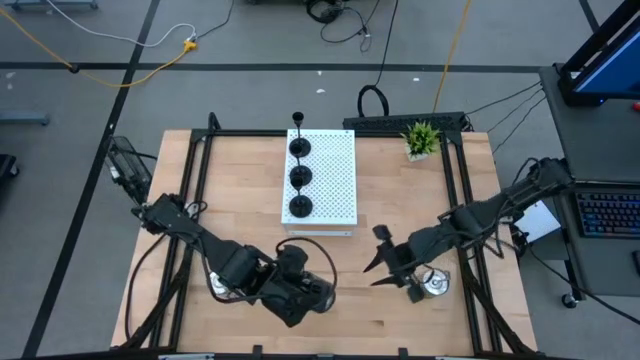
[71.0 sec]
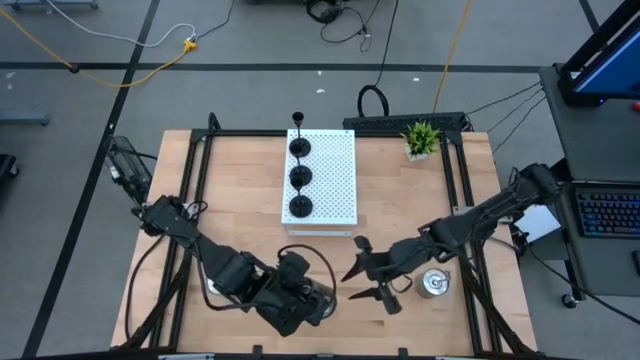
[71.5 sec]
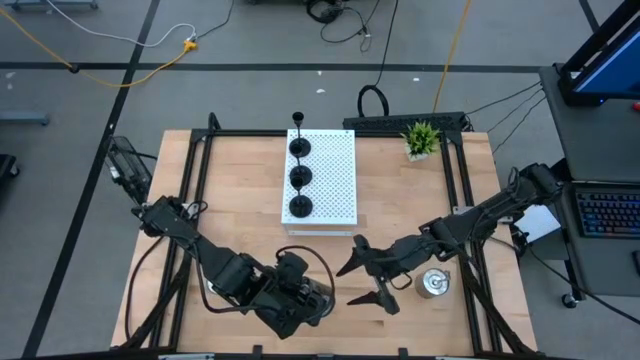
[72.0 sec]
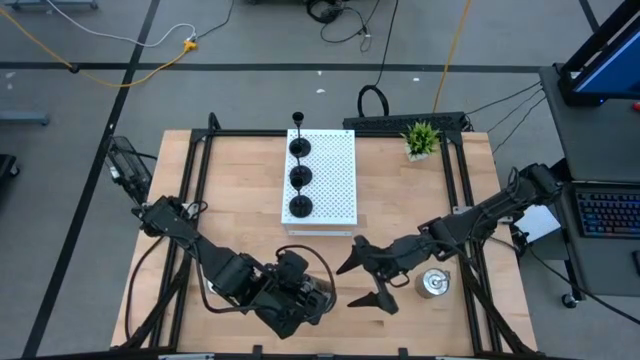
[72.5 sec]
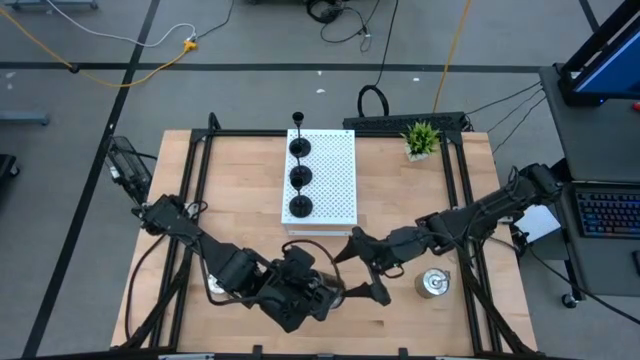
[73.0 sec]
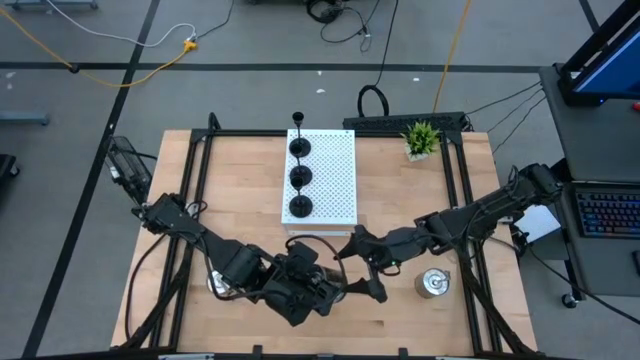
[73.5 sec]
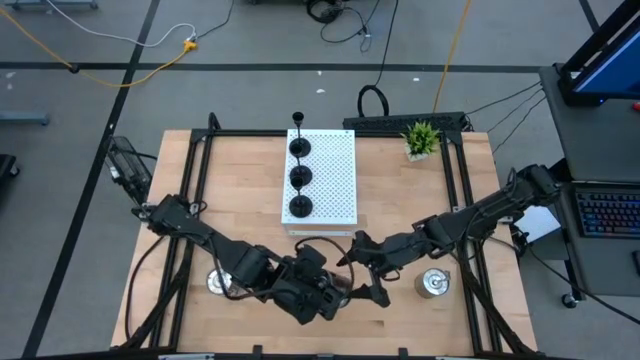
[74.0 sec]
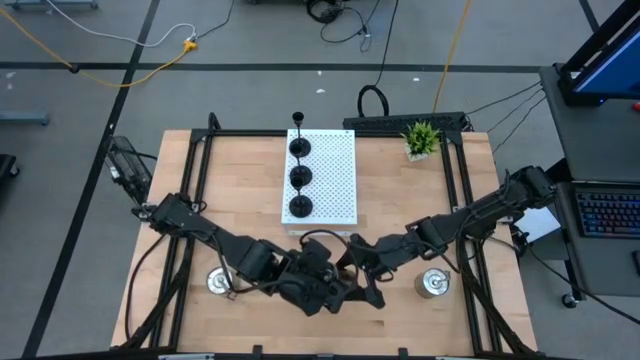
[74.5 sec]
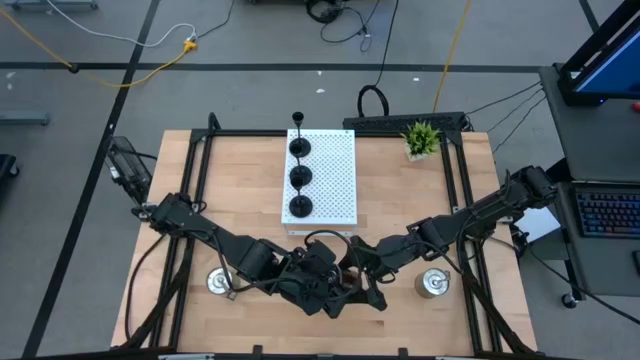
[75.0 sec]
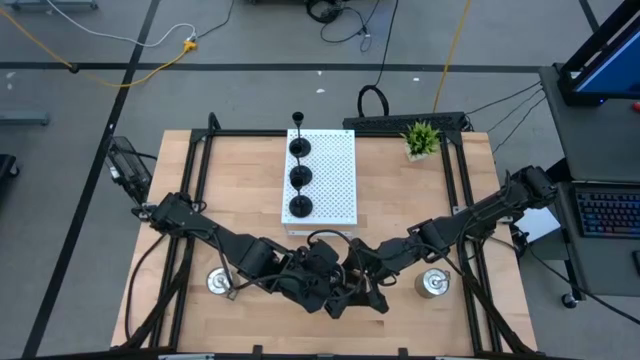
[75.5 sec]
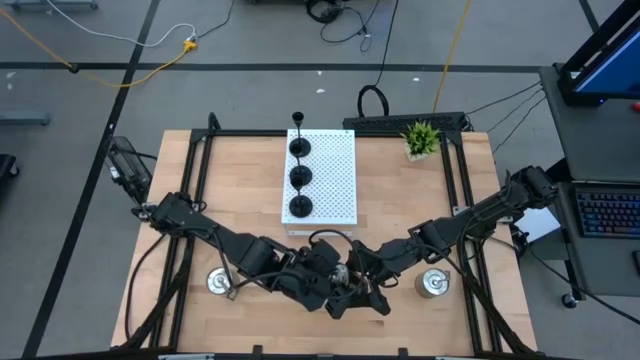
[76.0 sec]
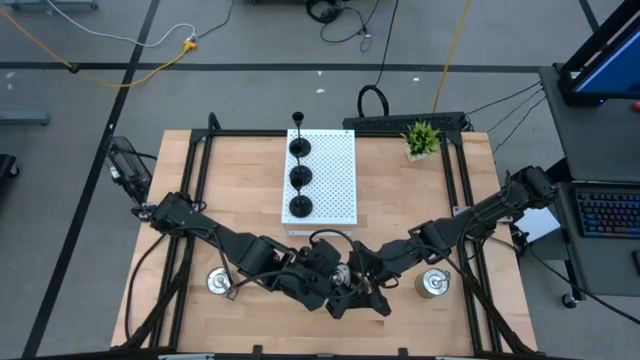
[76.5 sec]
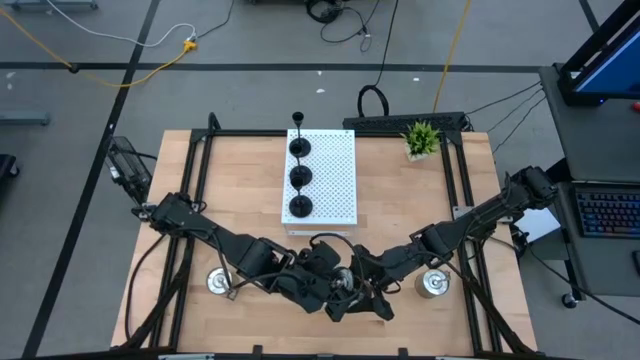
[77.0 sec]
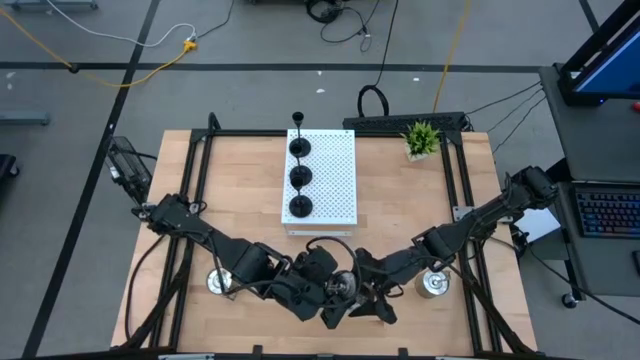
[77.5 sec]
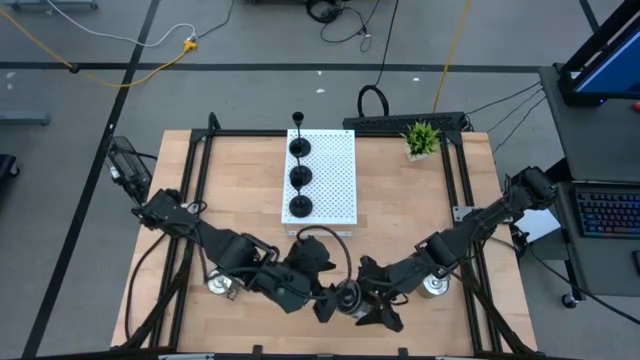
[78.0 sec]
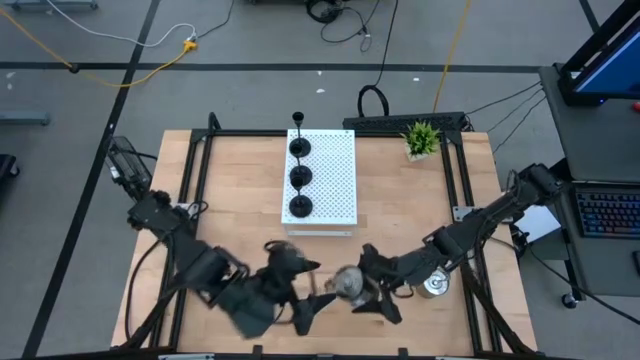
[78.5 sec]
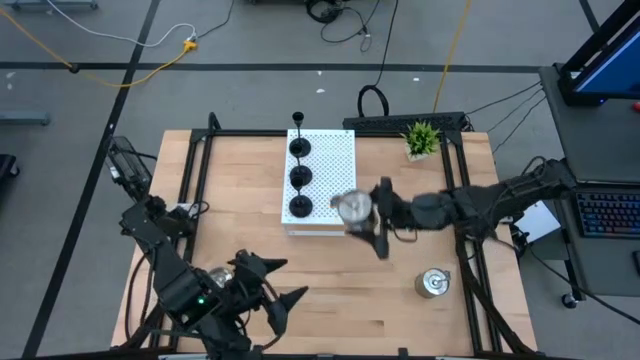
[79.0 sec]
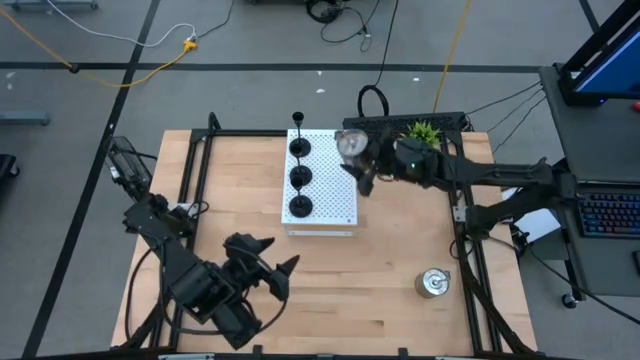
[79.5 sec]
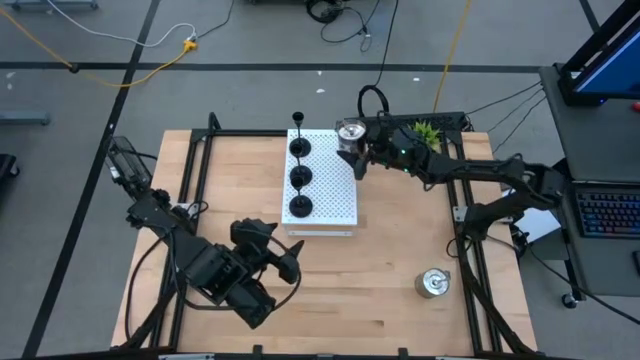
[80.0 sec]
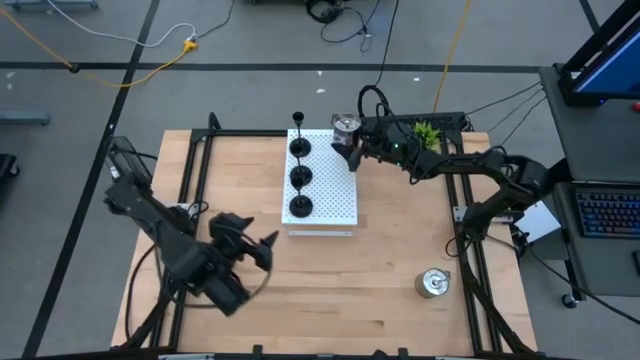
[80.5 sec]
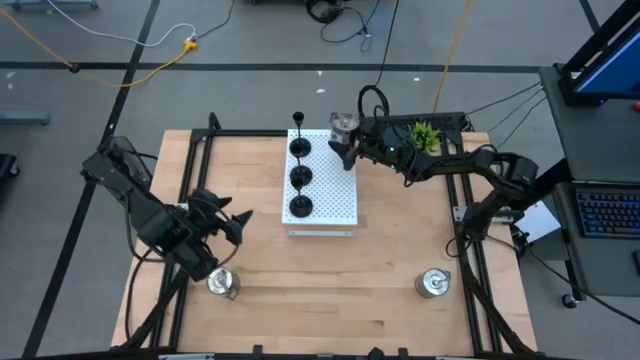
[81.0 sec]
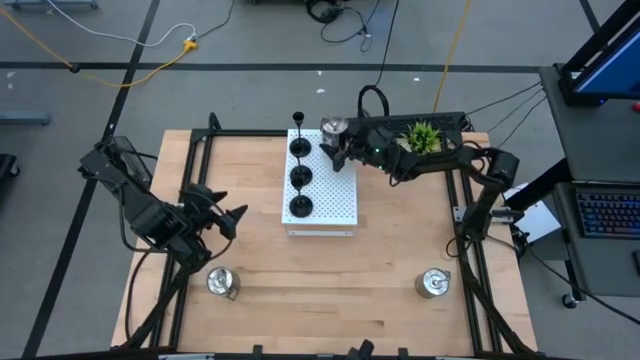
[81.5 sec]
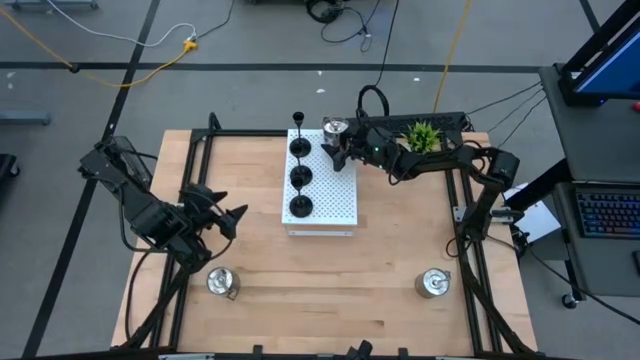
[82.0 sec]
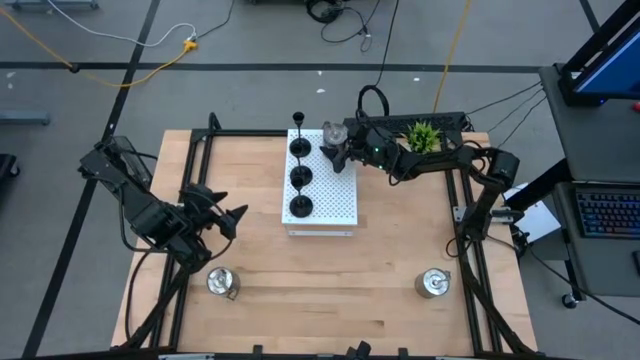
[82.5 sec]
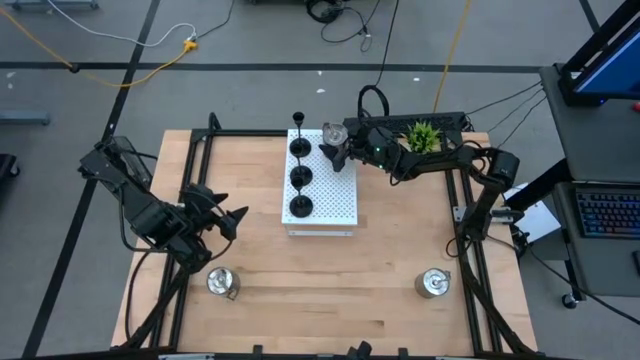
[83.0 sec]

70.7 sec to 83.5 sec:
Task: Pick & Place candle stick holders
Put the top left silver scented candle on the shelf

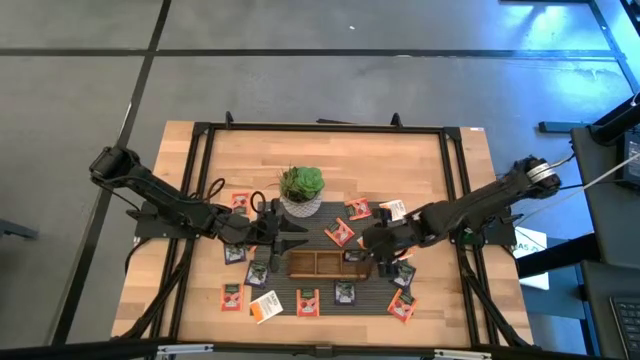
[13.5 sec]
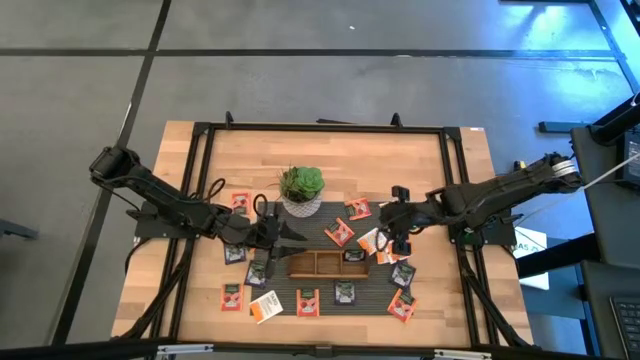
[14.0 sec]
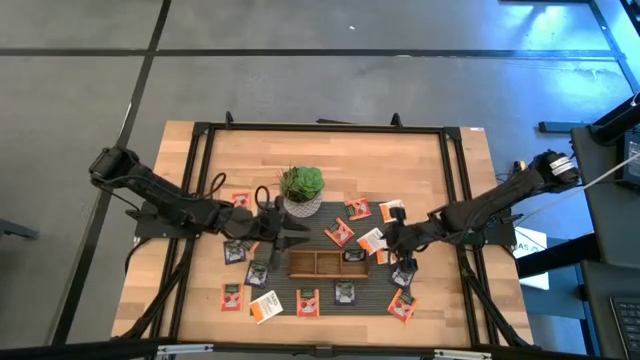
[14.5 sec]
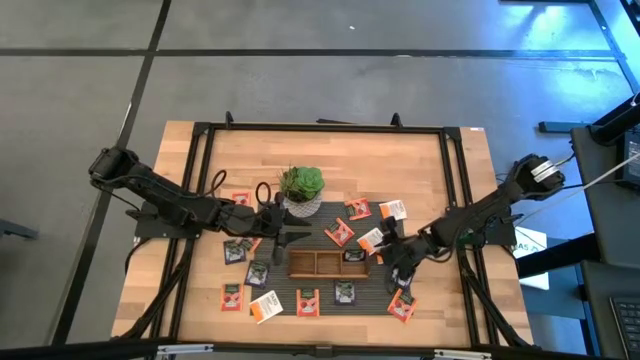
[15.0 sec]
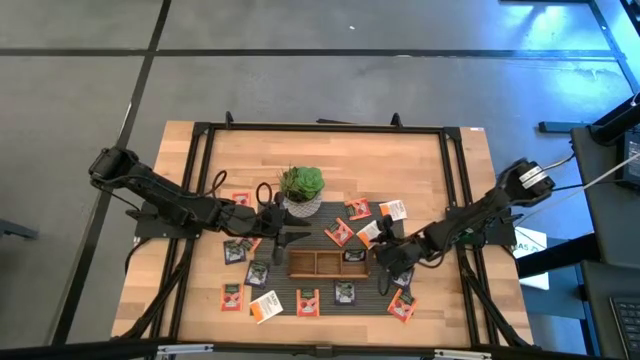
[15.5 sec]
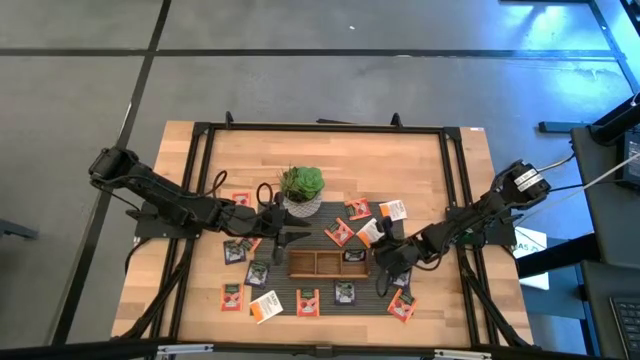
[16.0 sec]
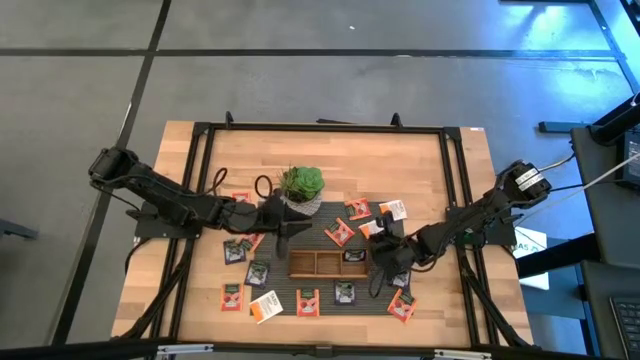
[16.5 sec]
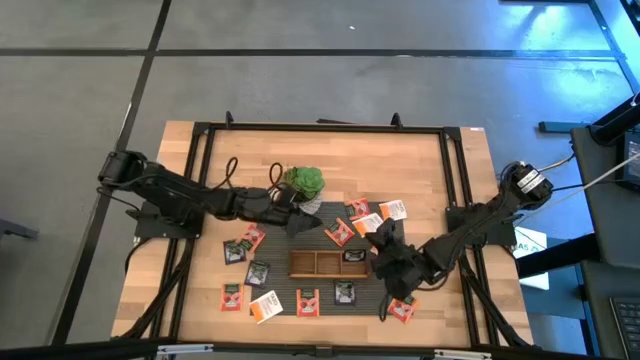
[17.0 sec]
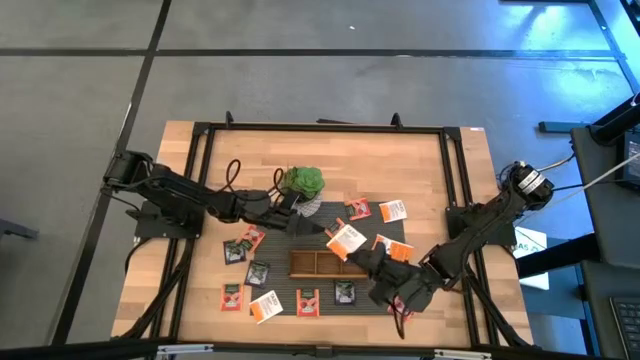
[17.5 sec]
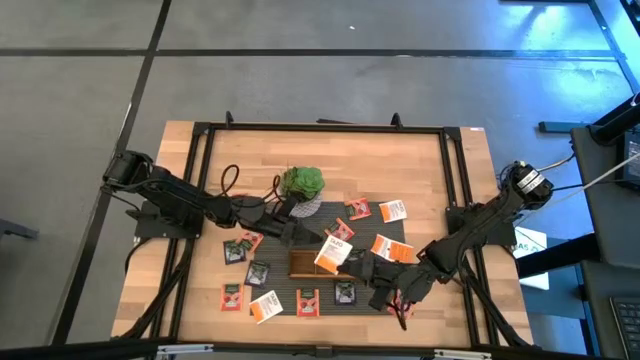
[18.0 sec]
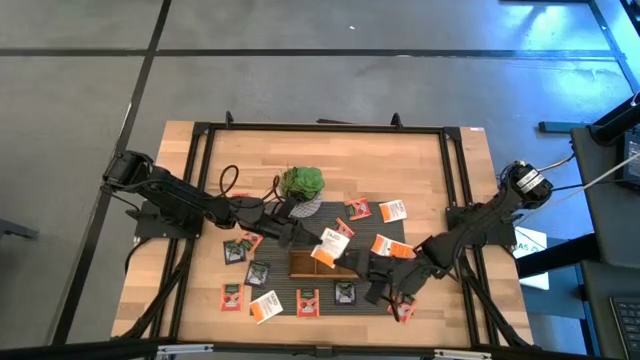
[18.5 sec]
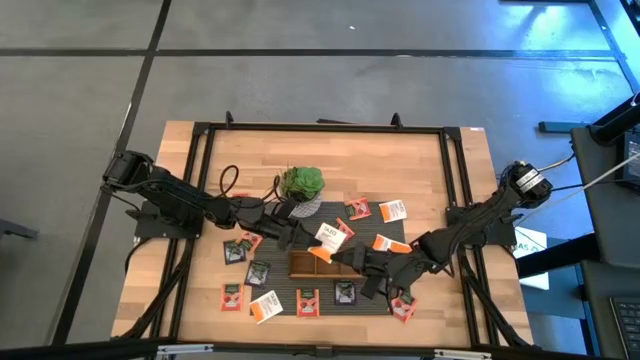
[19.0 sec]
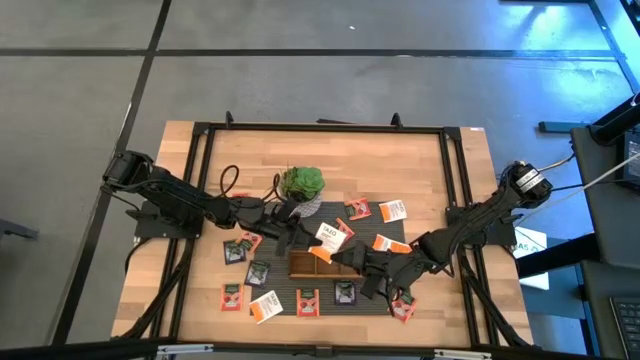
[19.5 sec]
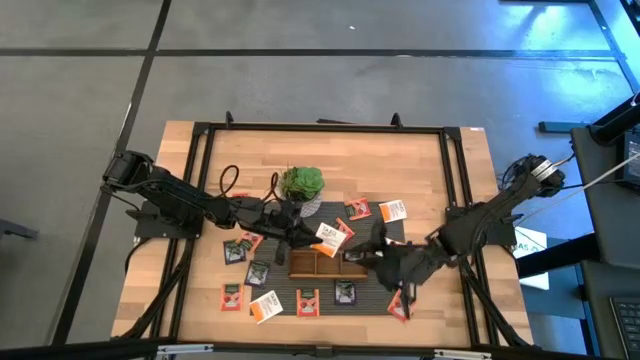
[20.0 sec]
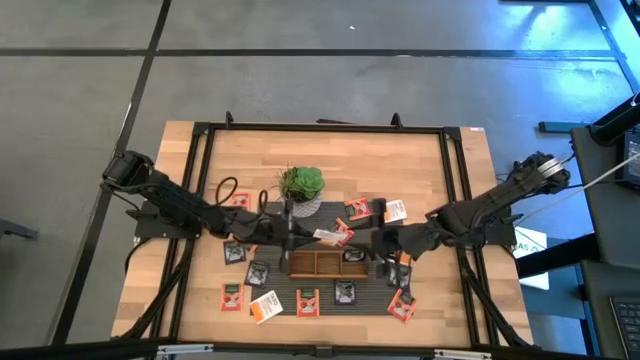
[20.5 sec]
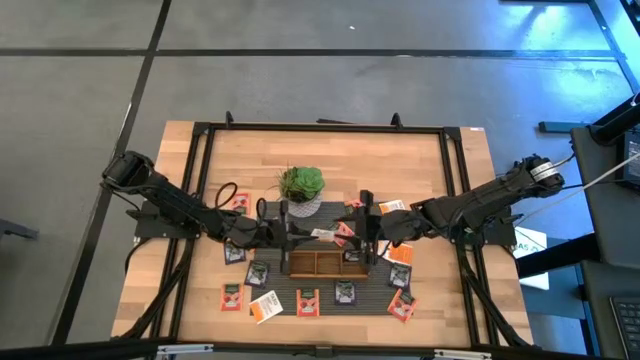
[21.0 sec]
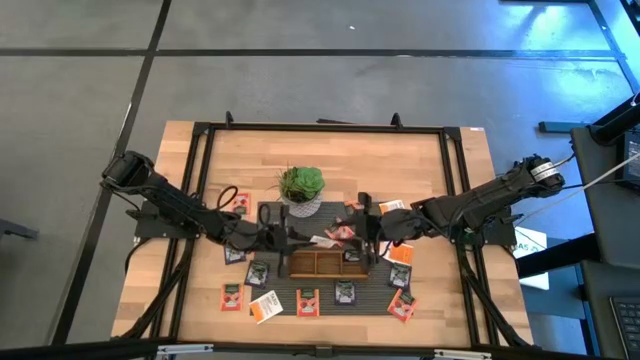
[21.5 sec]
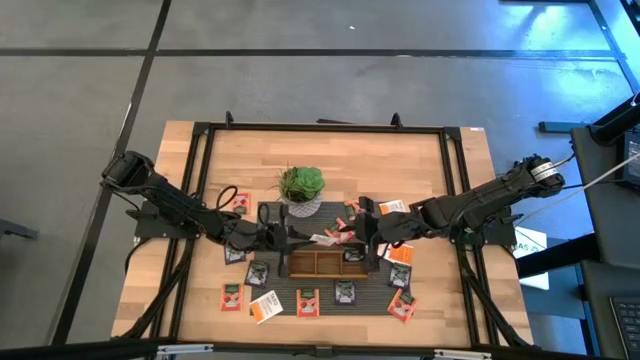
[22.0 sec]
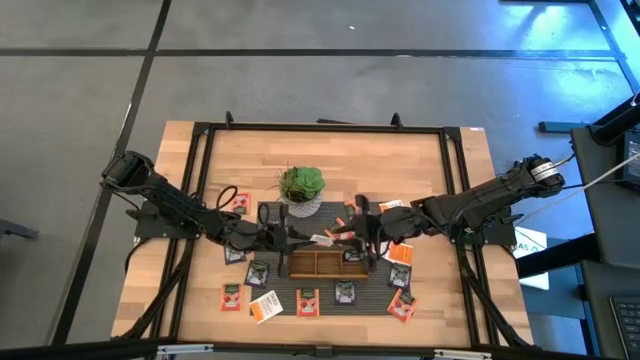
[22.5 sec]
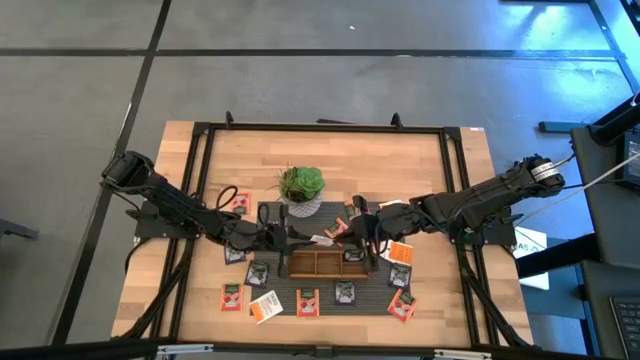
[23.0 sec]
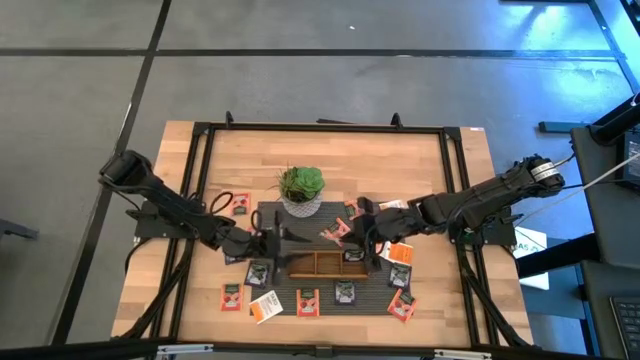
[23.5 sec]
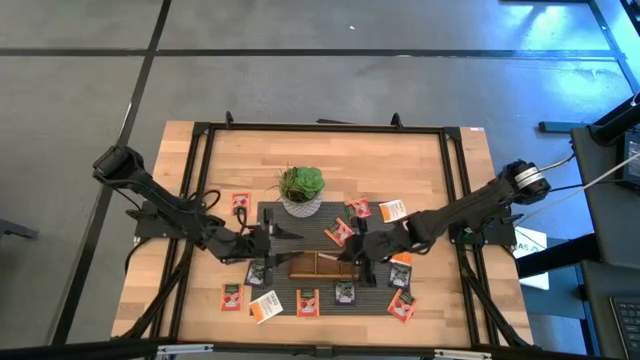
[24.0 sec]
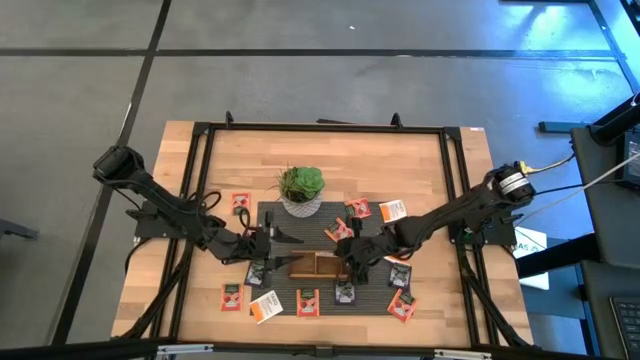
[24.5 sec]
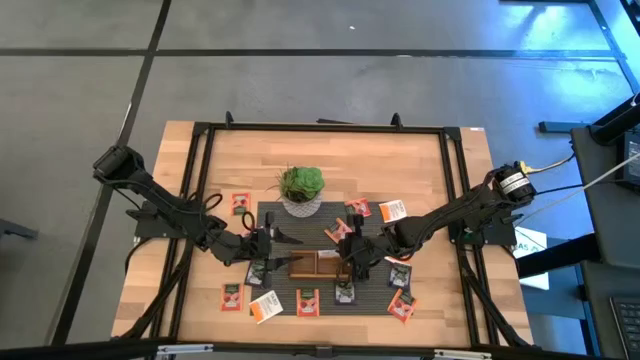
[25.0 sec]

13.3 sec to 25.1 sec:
Task: Pick & Place Tea
Put the white tea bag into the middle of the wooden organizer
